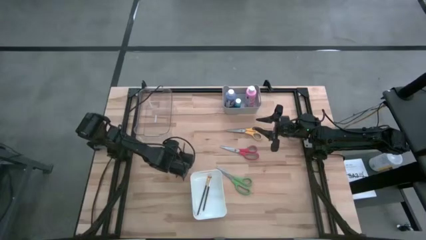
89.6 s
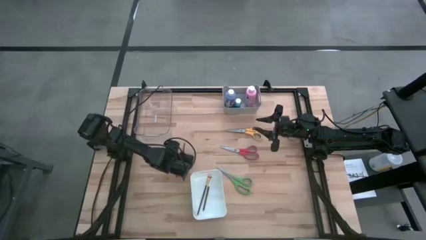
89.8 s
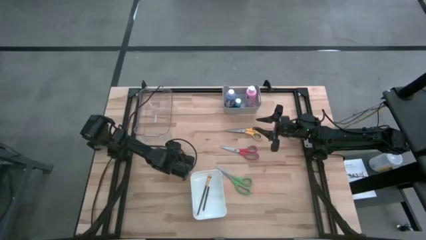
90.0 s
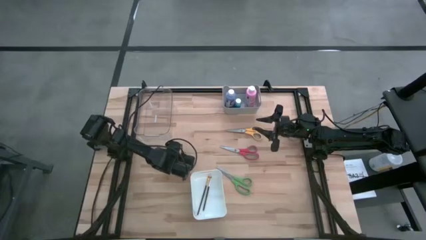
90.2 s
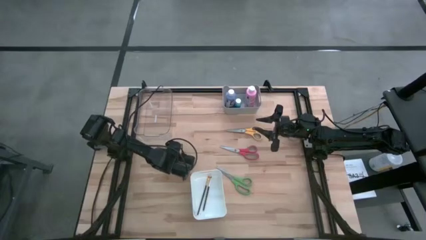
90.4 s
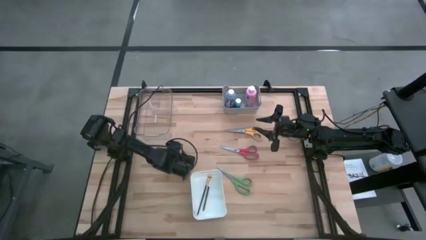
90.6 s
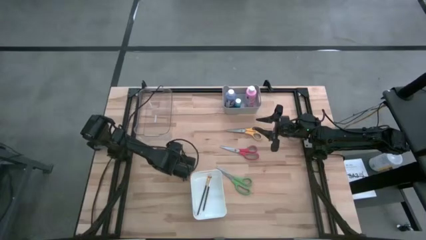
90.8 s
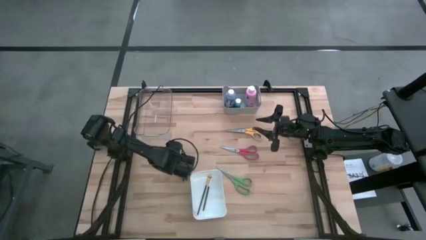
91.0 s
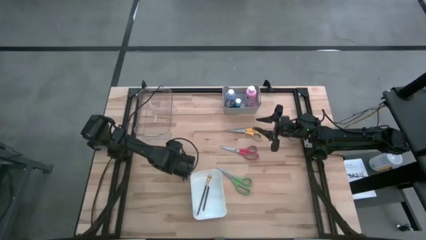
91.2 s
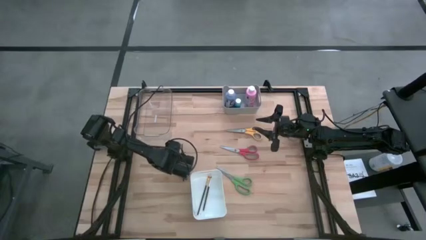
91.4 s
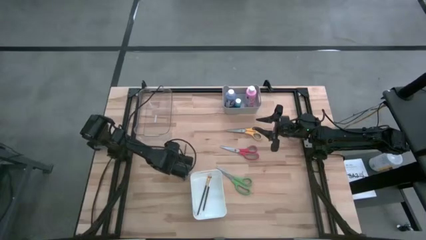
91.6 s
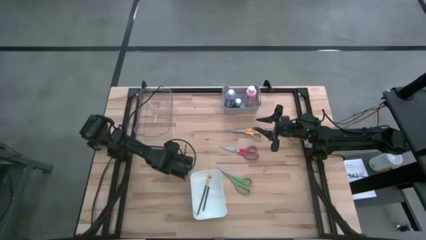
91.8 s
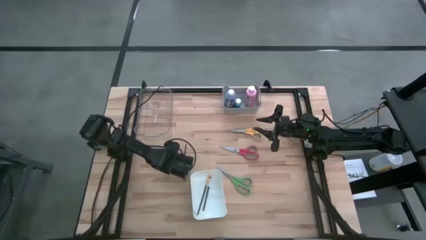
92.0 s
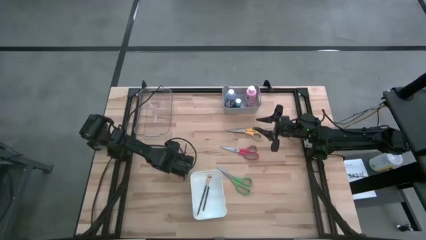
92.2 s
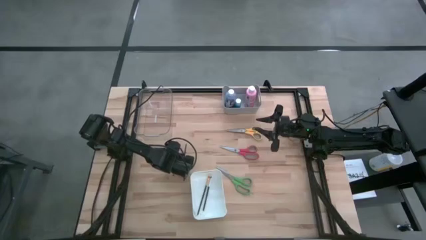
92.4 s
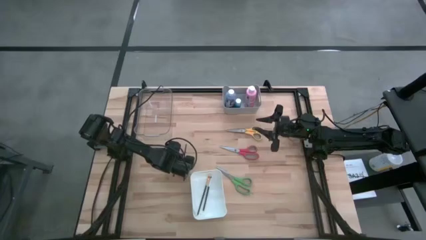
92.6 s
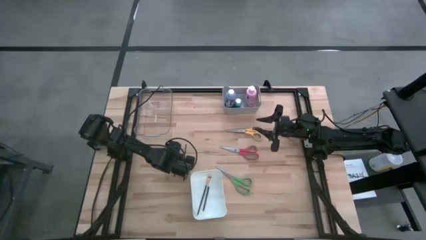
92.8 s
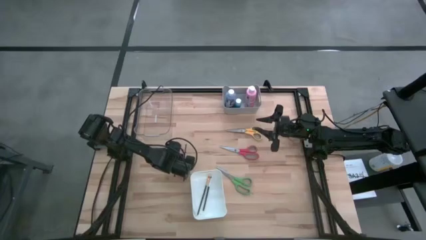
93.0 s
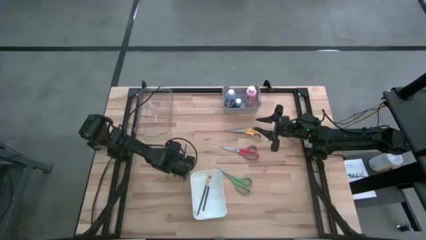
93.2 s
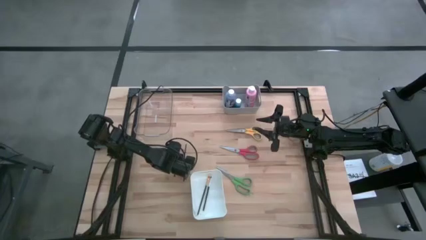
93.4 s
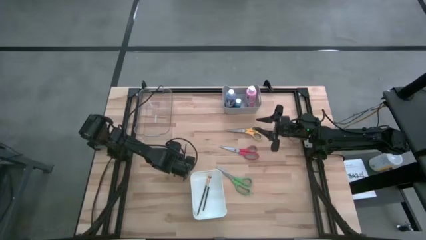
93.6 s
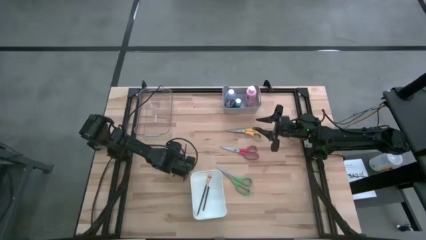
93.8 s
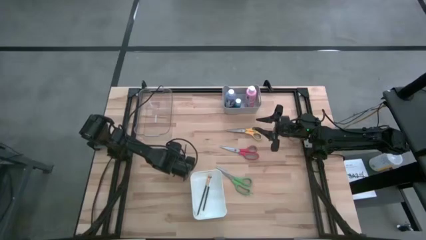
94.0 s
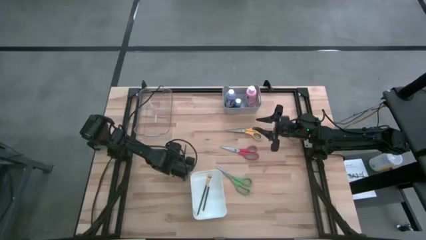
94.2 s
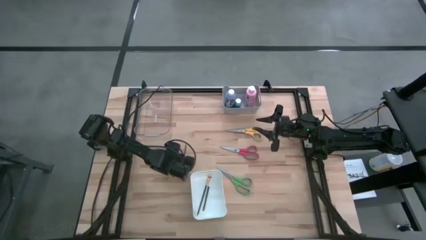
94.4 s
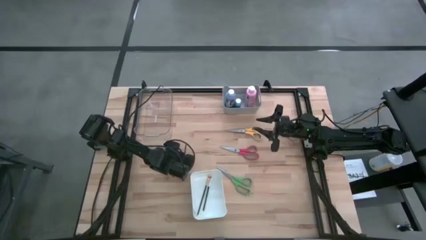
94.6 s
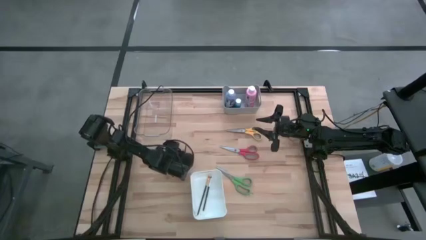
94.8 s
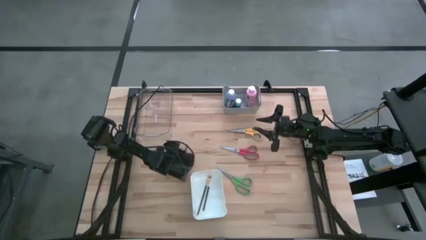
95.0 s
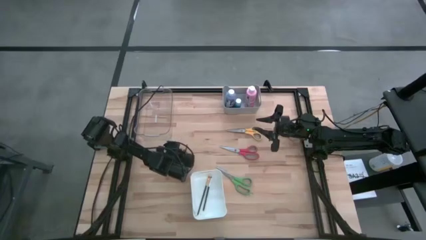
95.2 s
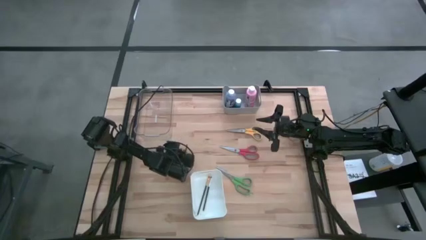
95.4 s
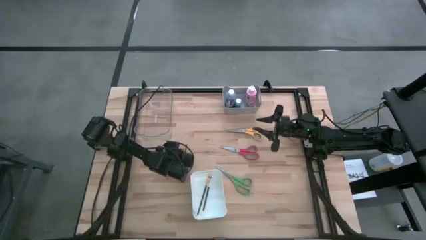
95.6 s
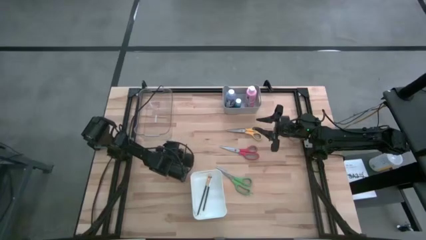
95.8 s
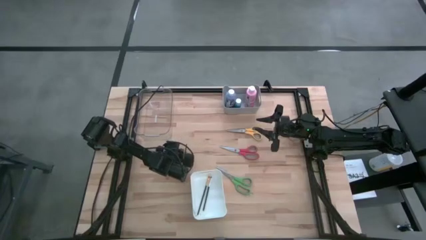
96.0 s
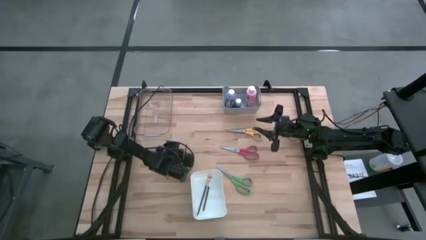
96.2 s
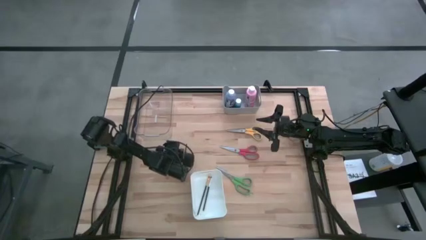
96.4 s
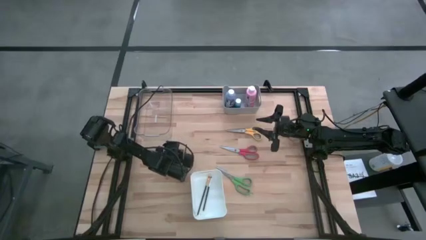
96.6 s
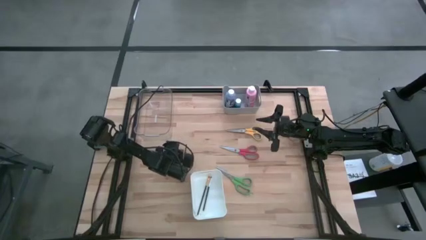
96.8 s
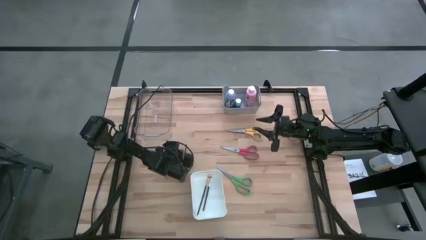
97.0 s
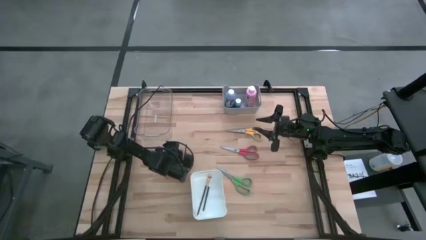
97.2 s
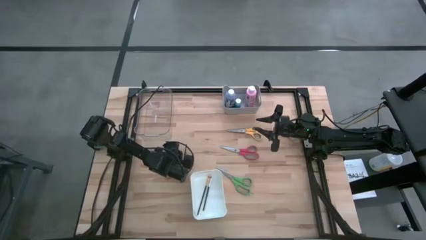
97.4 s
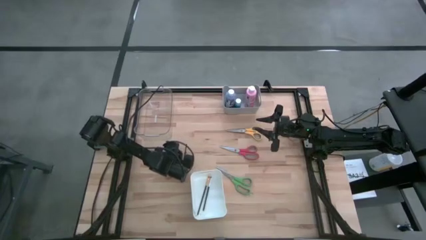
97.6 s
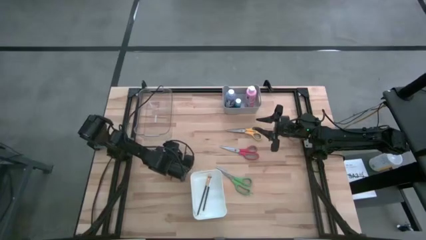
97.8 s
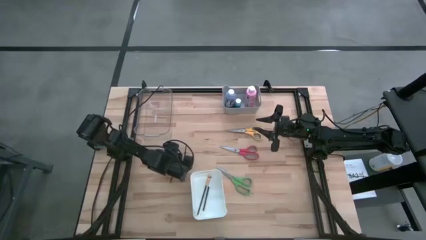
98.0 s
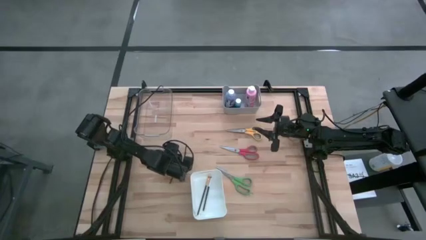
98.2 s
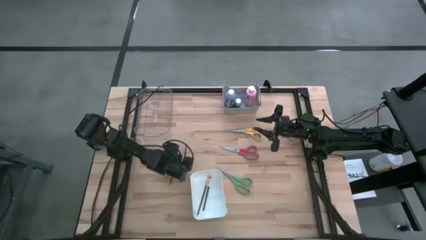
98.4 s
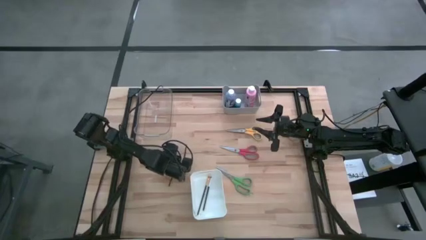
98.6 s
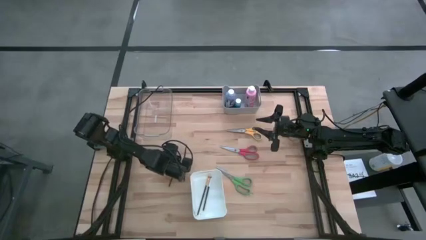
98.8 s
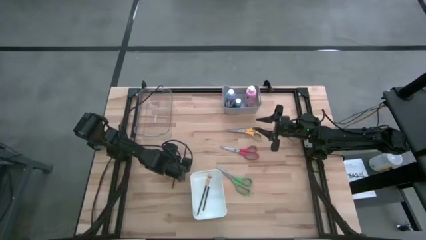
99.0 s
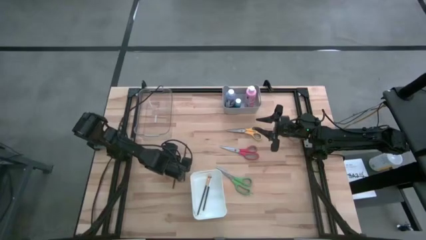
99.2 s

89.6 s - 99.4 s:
Task: Pick & Place Paint Supplies
Put the left silver liner brush into the gray bin

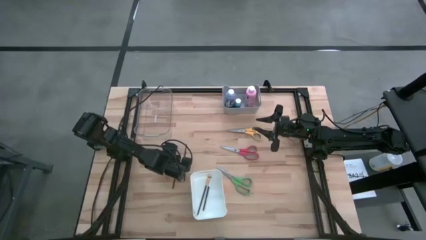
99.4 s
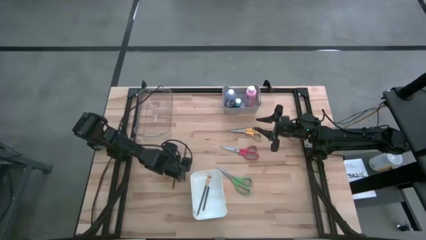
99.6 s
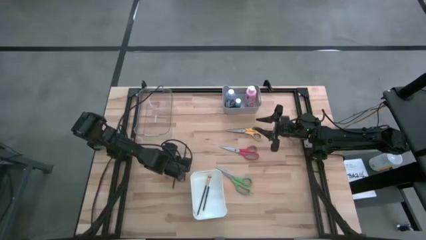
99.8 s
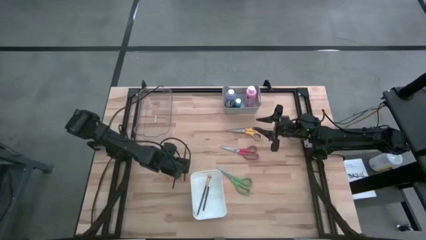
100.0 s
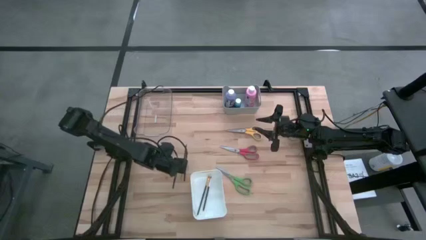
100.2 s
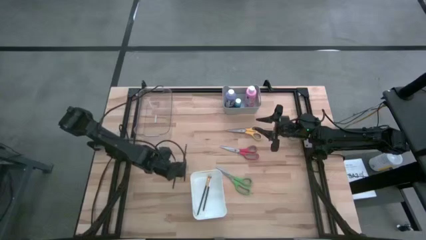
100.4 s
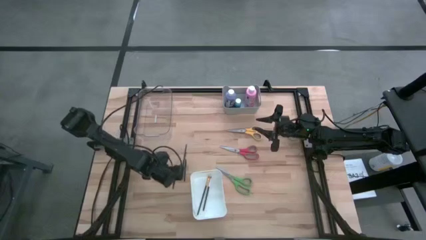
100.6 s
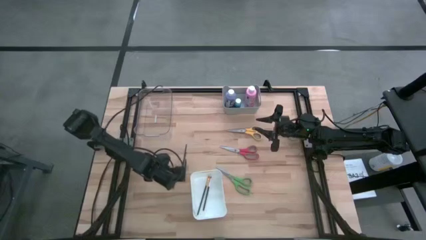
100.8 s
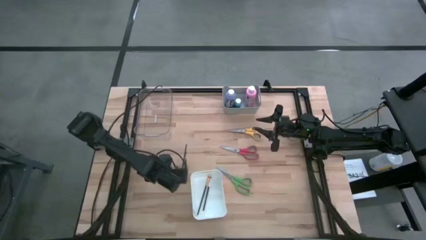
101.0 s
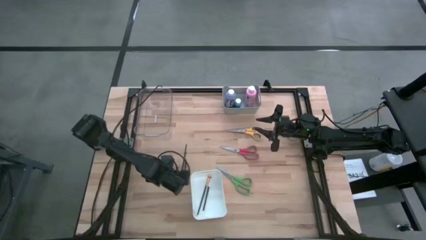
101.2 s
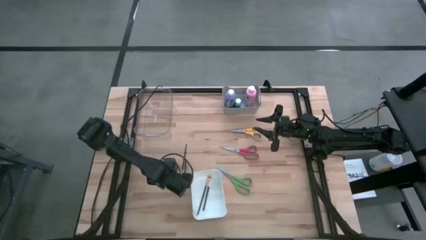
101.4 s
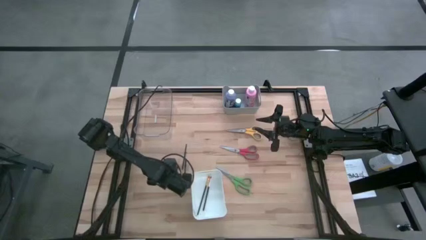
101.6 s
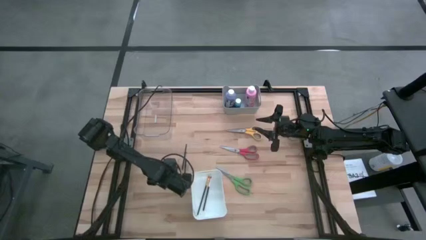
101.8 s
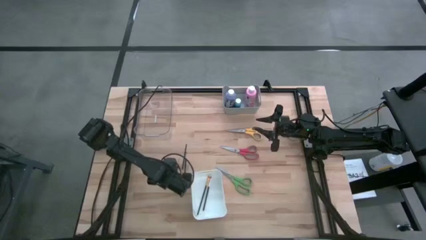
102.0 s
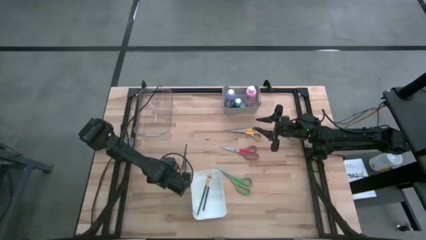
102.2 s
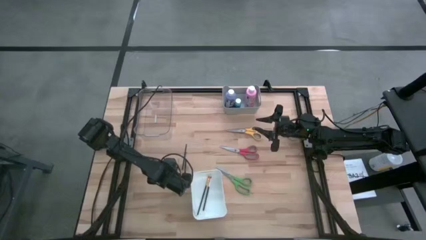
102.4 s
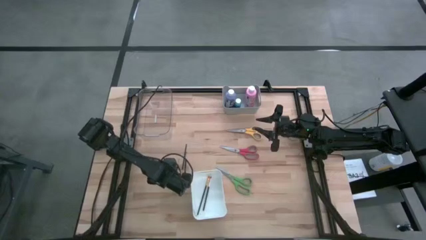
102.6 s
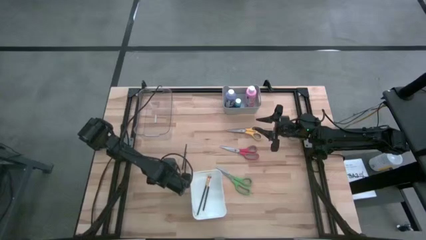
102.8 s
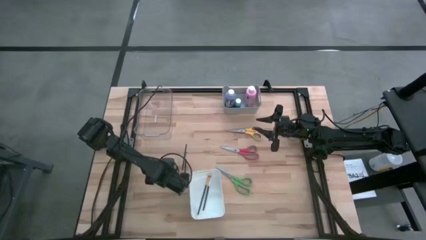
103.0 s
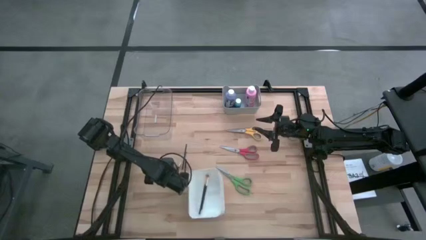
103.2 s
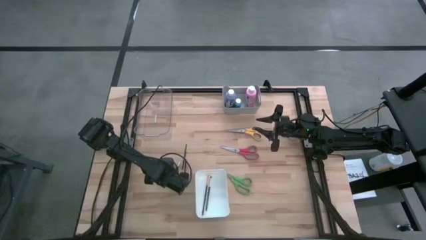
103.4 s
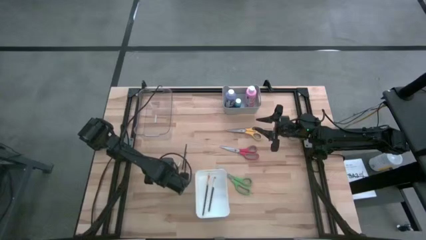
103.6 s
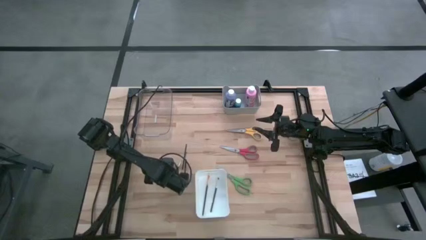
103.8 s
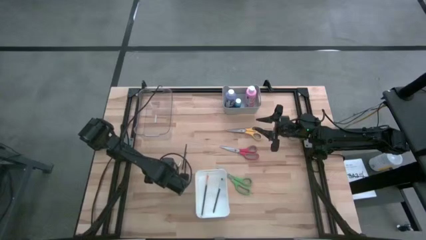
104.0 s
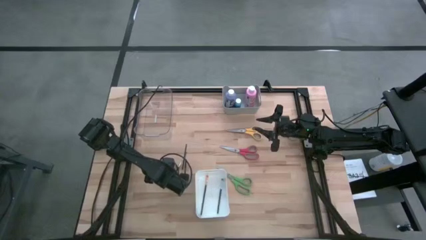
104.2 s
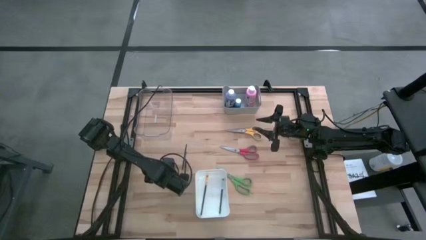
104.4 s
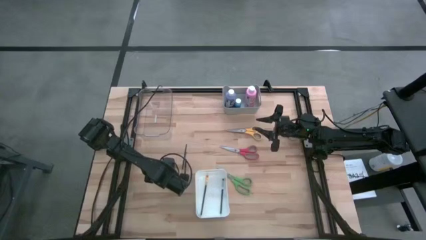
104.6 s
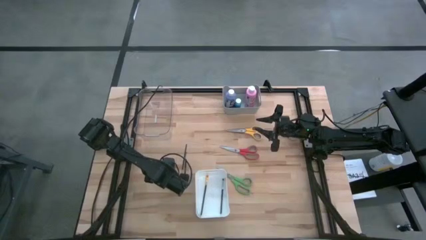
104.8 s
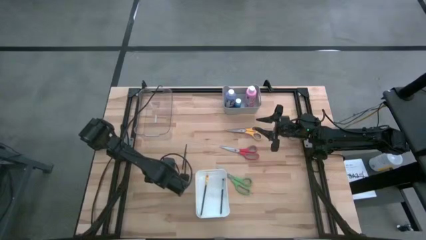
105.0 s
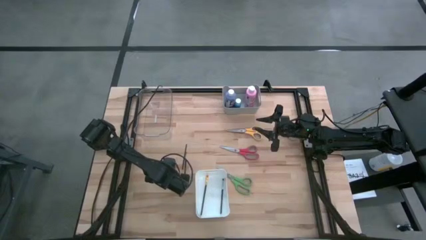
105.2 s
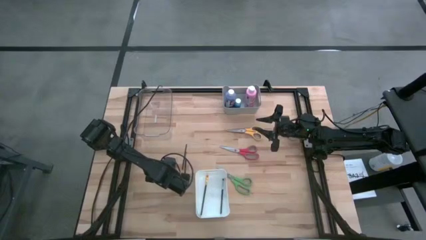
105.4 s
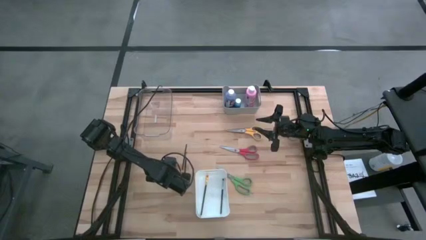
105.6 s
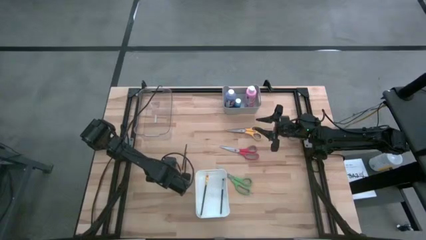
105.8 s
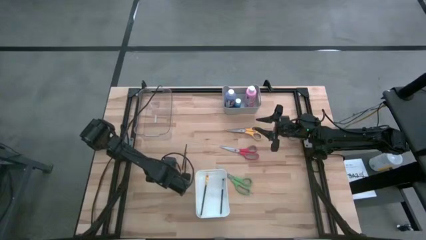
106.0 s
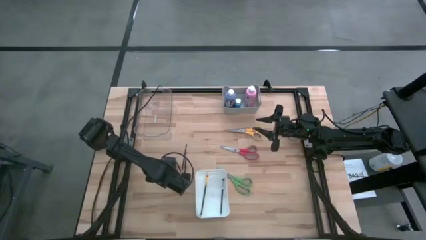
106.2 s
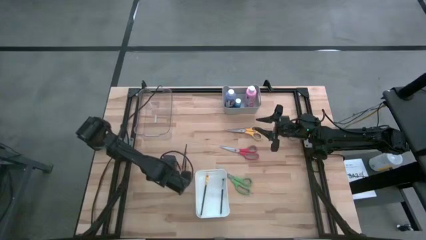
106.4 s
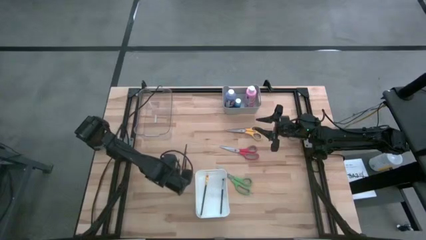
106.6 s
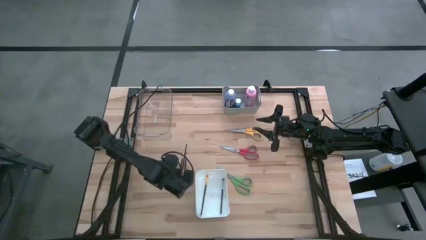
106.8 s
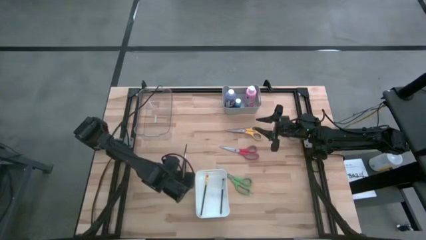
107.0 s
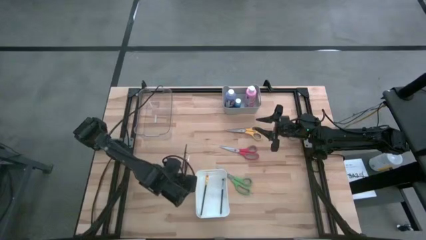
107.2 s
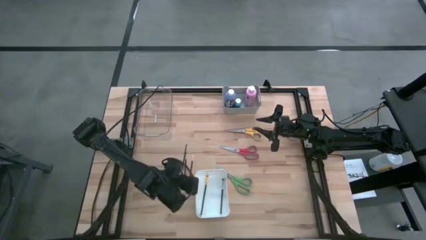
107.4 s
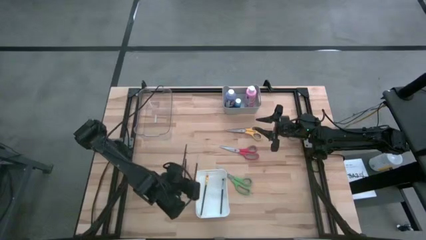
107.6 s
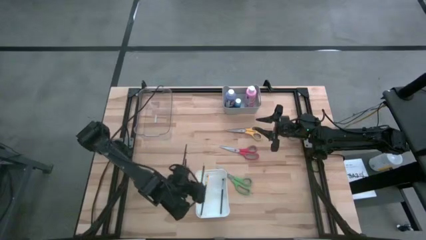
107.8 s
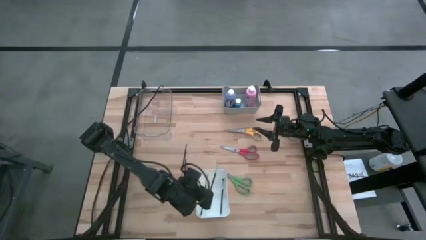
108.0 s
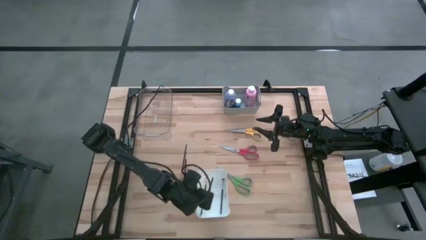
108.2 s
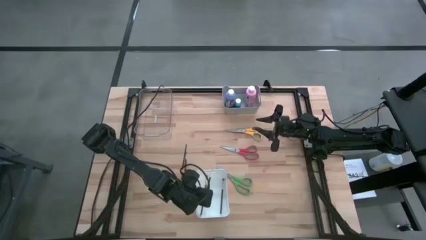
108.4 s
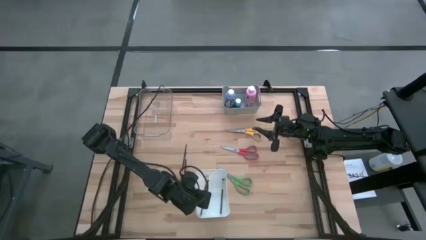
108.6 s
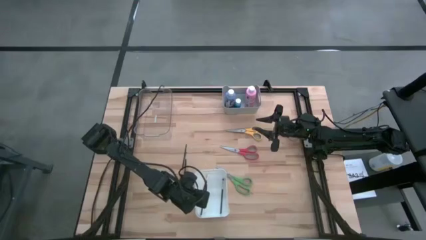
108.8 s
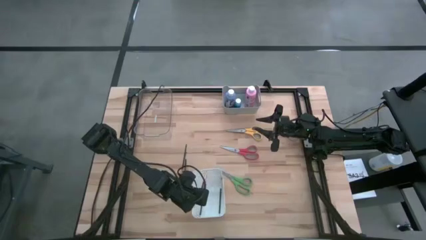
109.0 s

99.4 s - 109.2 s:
Put the left silver liner brush into the gray bin
